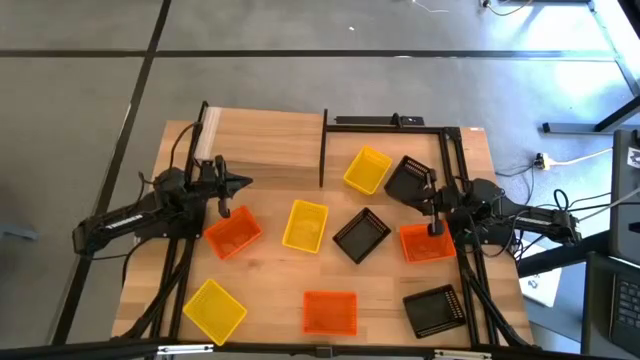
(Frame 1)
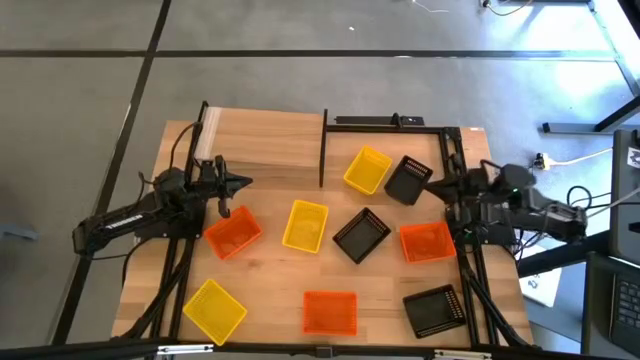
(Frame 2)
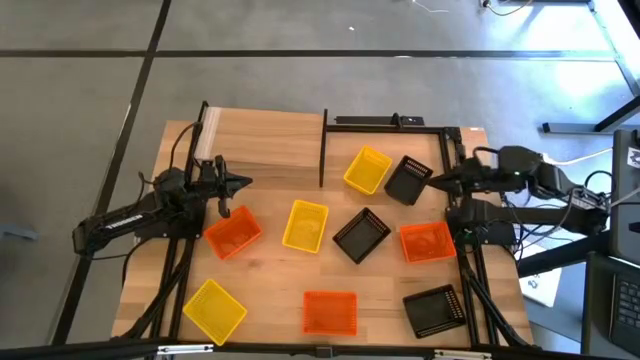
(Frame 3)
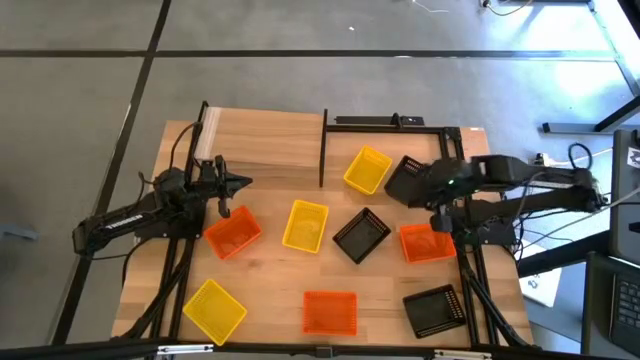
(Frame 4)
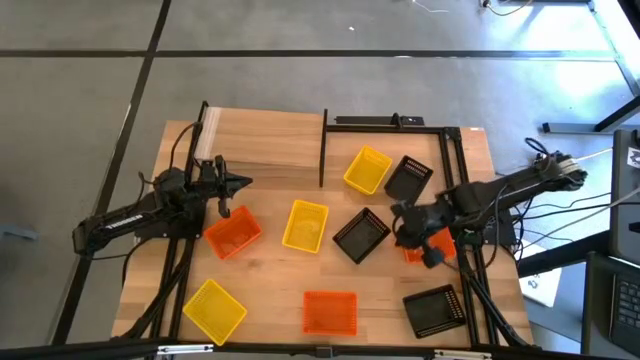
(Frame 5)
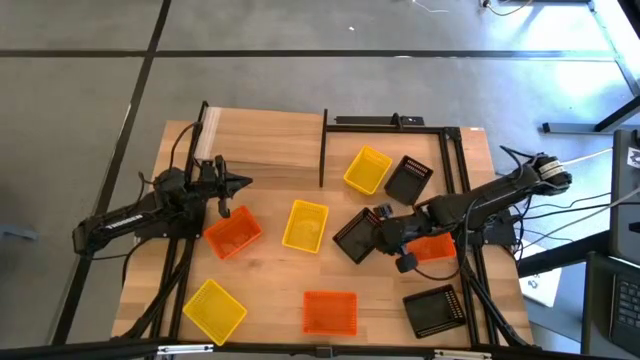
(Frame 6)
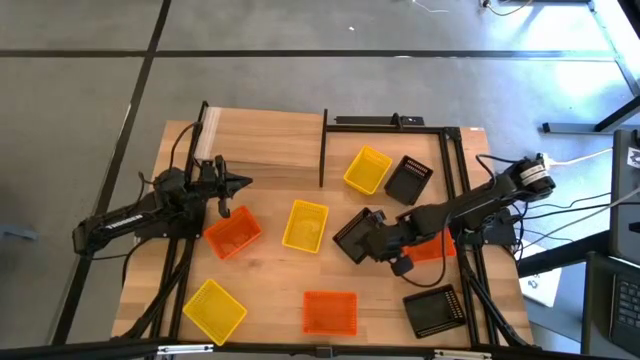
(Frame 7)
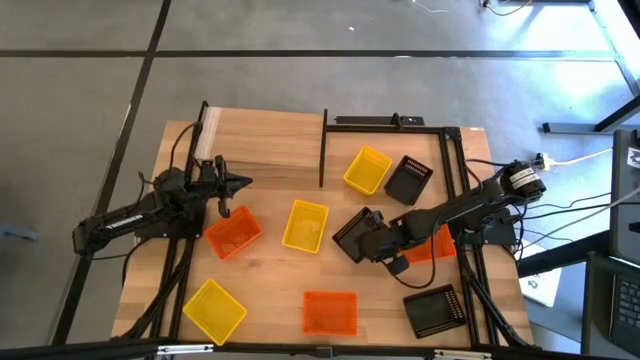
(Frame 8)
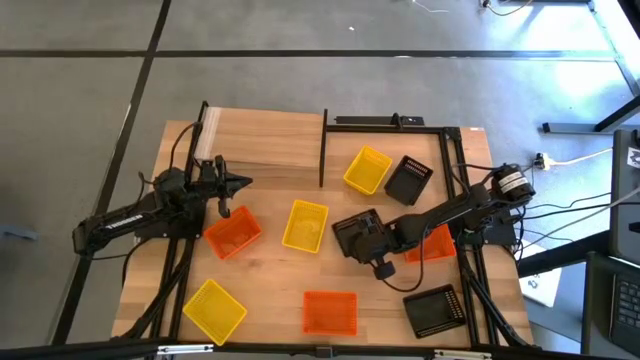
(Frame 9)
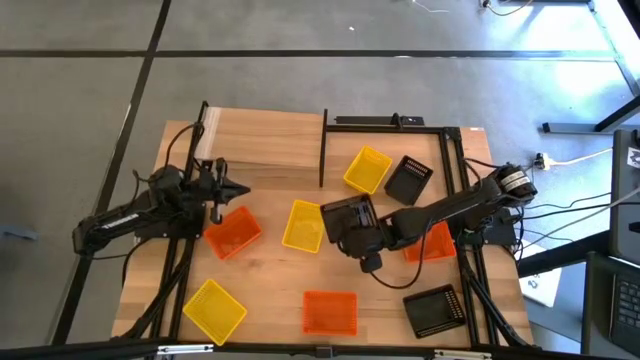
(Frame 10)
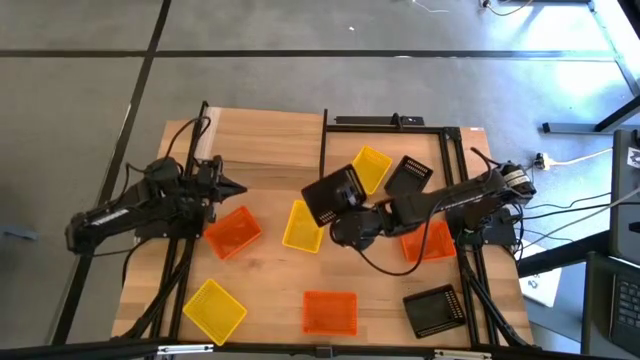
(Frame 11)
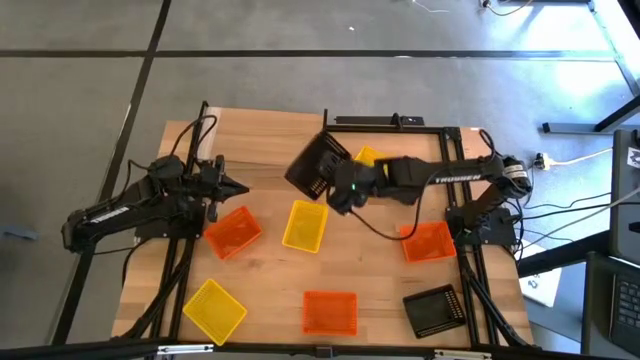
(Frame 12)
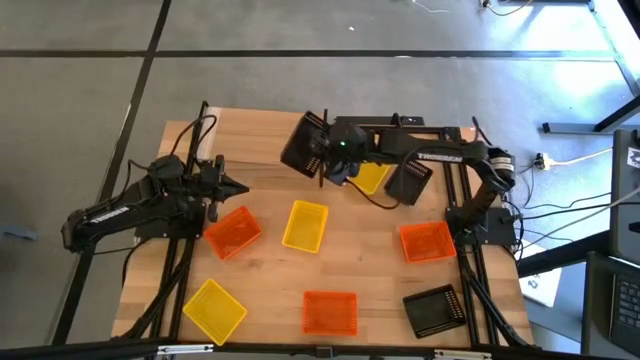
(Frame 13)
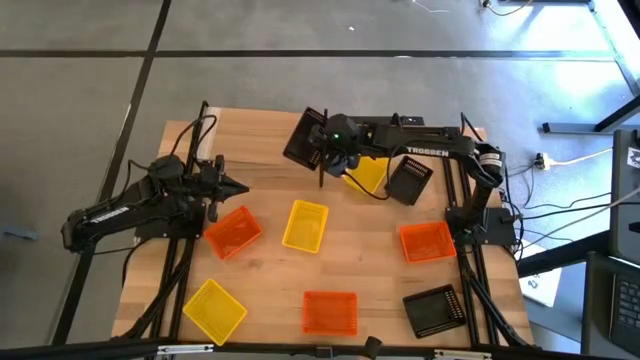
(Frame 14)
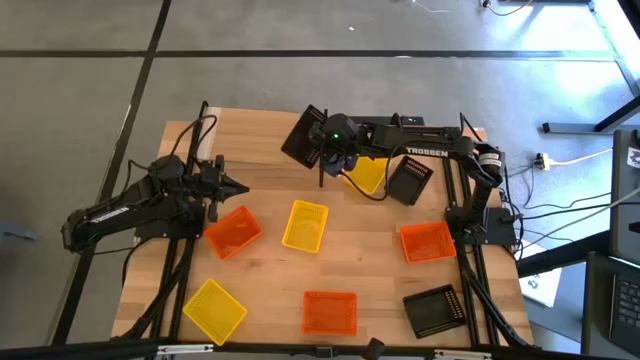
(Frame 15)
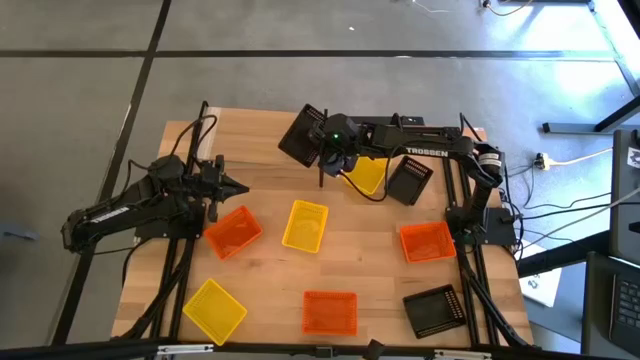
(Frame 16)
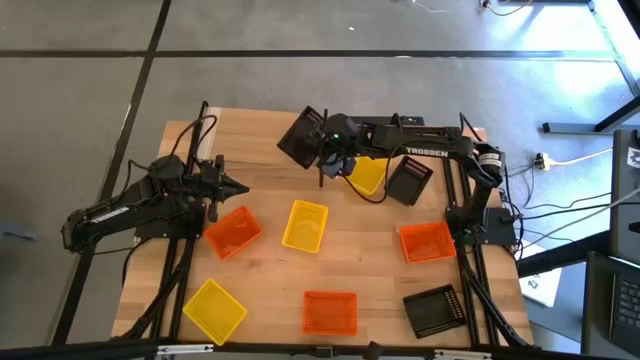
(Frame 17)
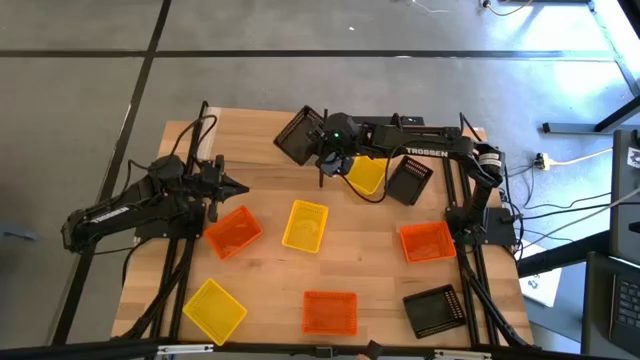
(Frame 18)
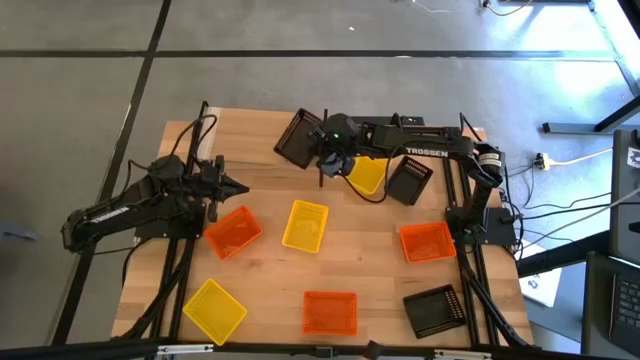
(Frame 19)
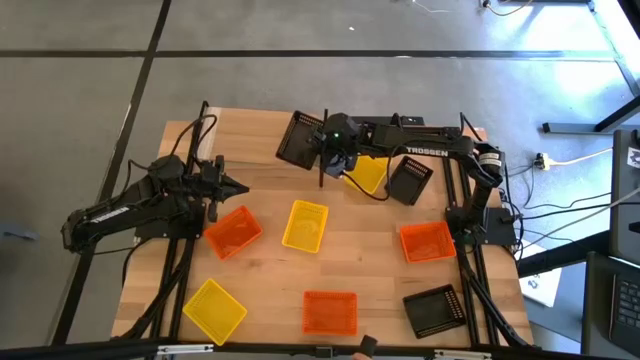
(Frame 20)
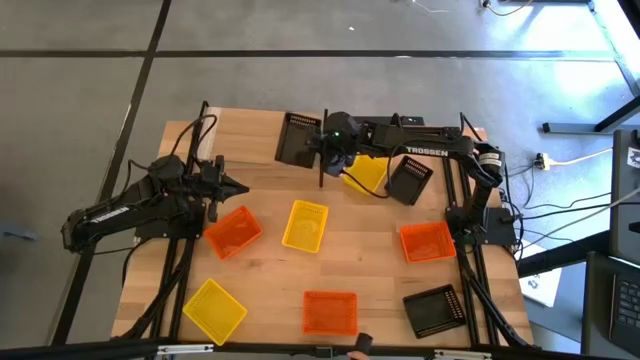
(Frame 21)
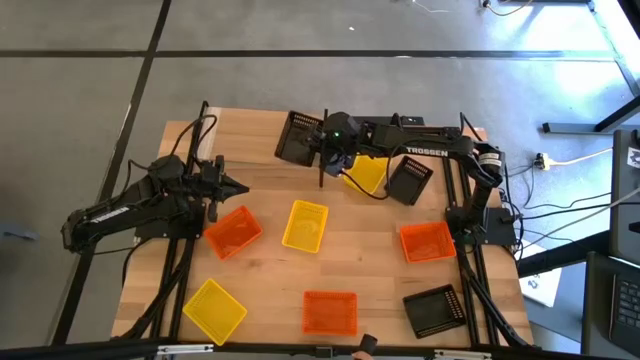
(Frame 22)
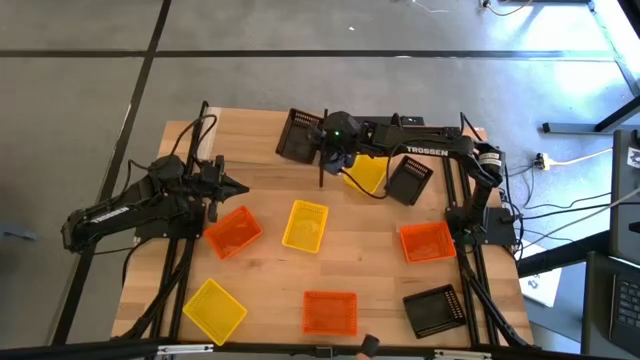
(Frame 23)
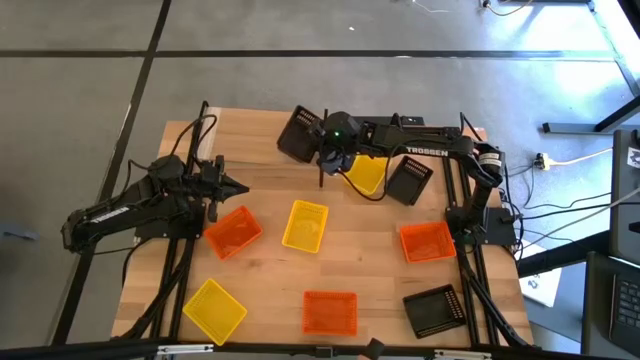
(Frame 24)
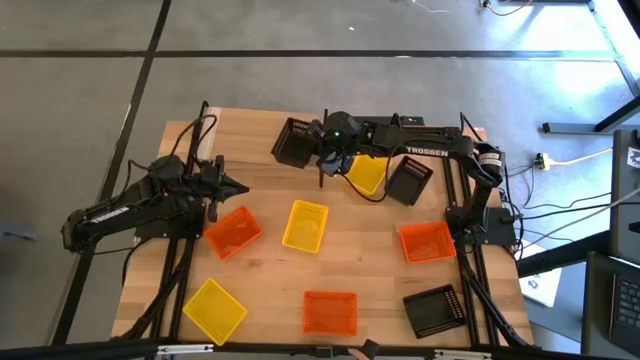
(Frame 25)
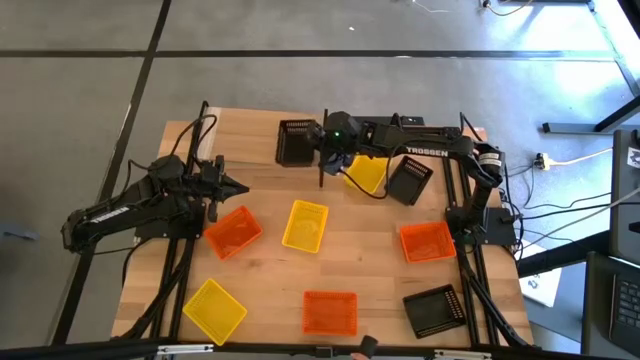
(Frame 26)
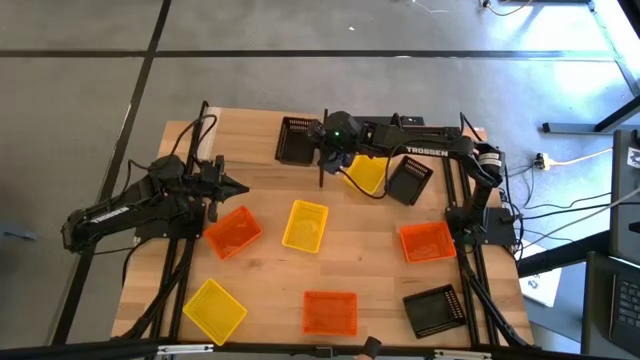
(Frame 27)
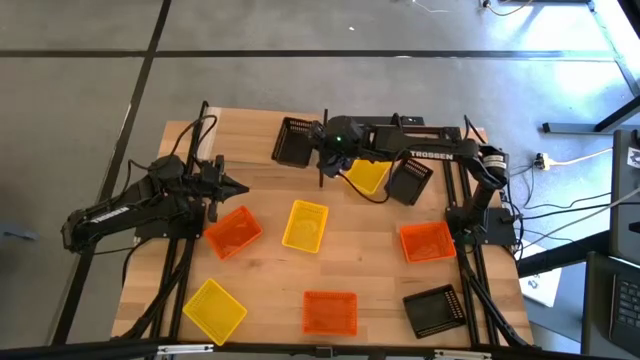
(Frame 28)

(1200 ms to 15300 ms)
Task: Stack baskets on shelf by color
Put the middle black basket on the shelf

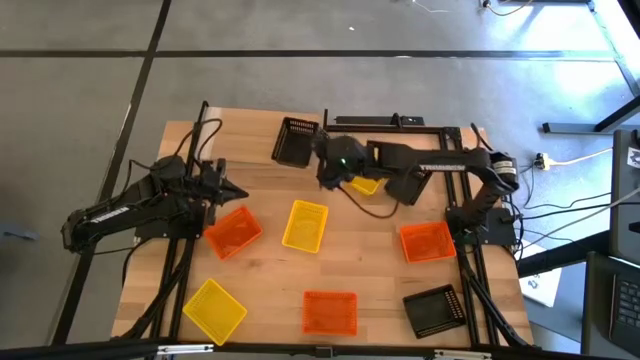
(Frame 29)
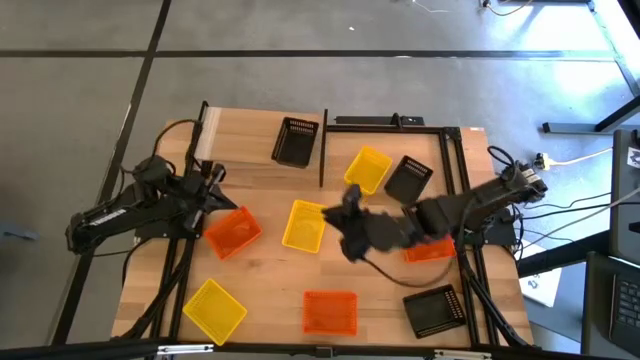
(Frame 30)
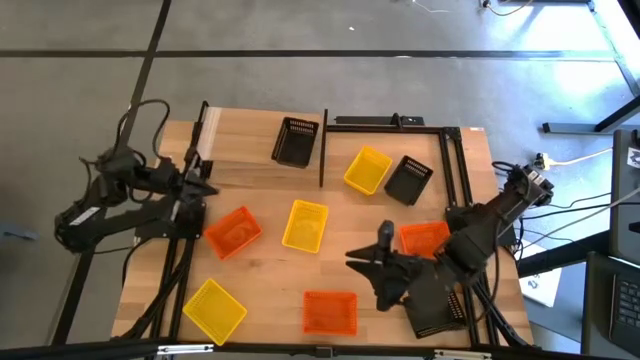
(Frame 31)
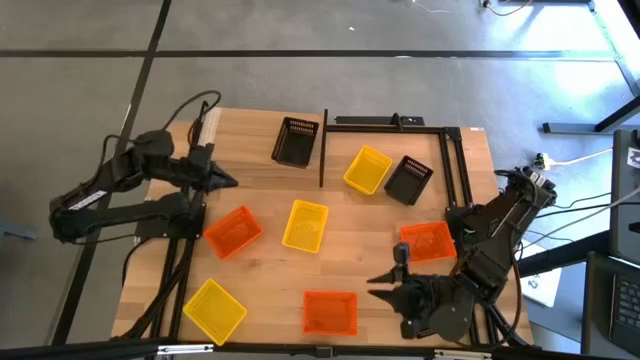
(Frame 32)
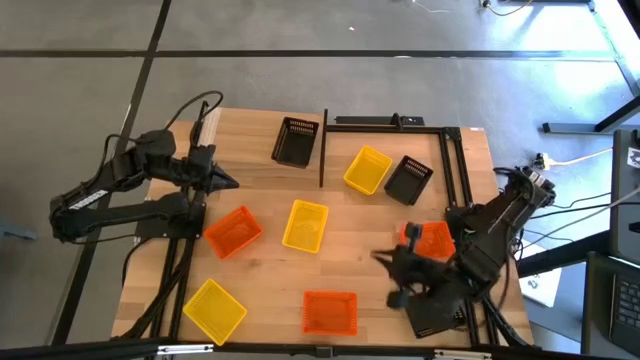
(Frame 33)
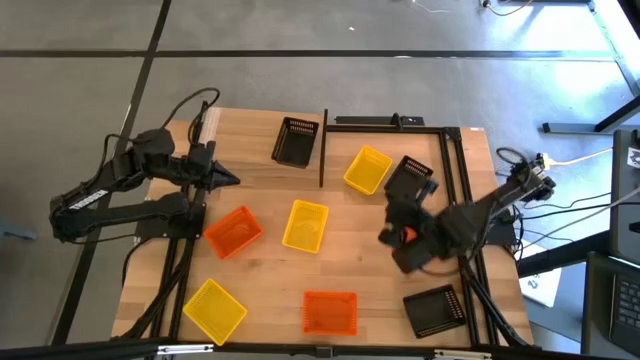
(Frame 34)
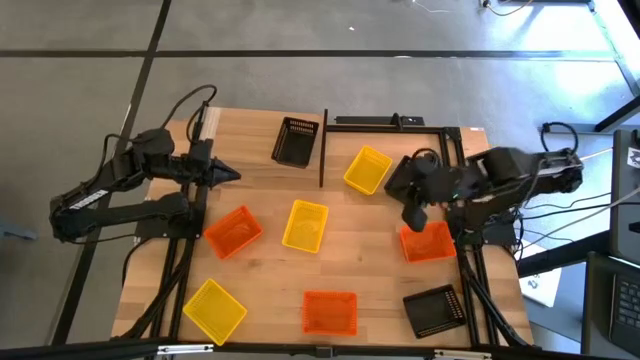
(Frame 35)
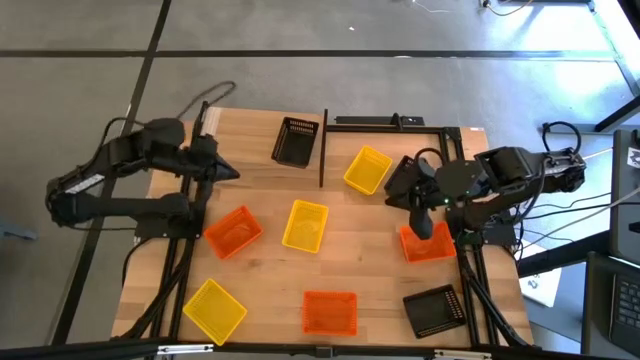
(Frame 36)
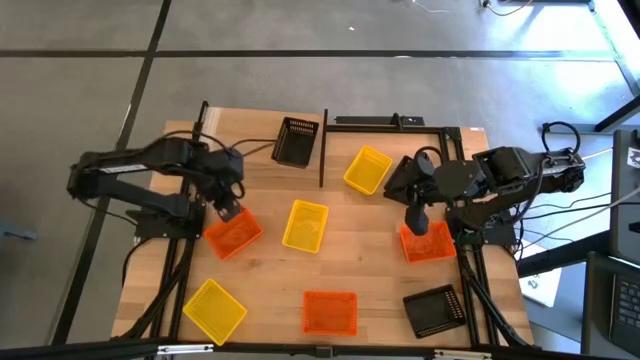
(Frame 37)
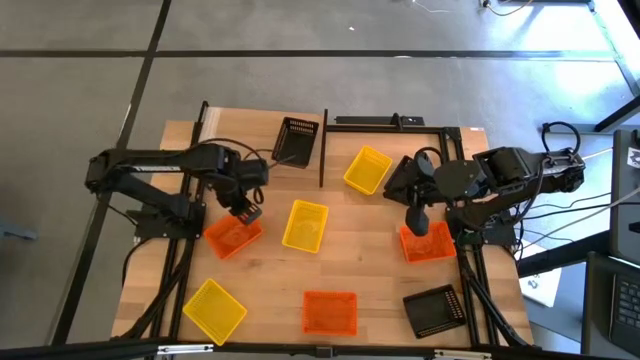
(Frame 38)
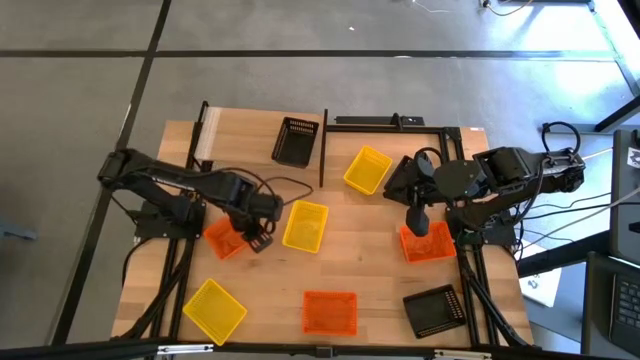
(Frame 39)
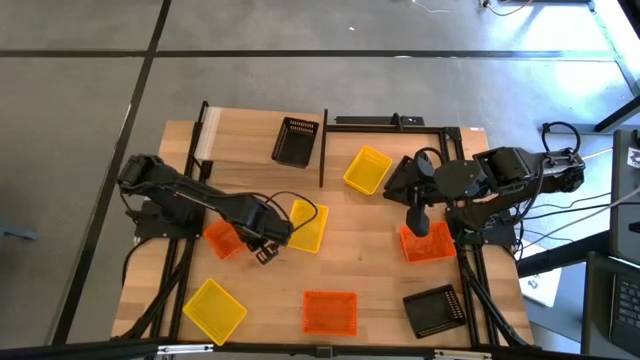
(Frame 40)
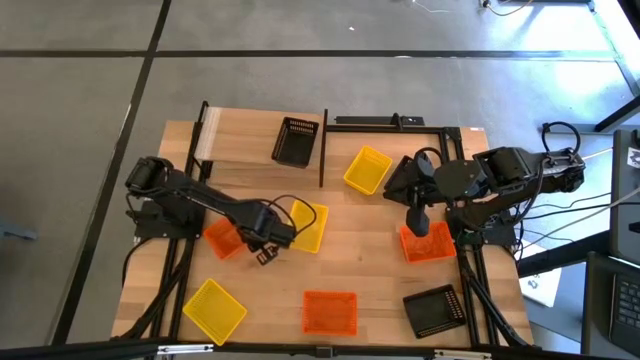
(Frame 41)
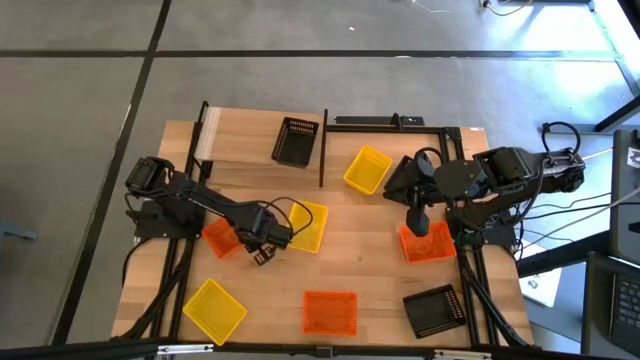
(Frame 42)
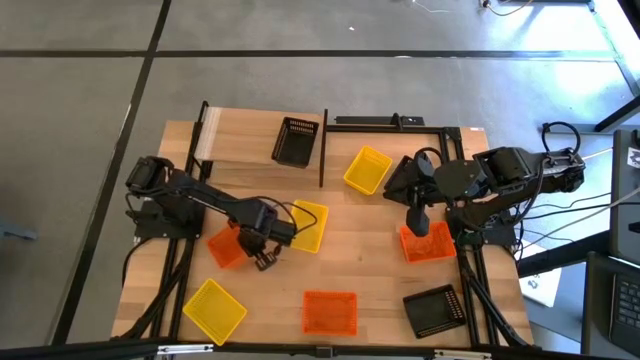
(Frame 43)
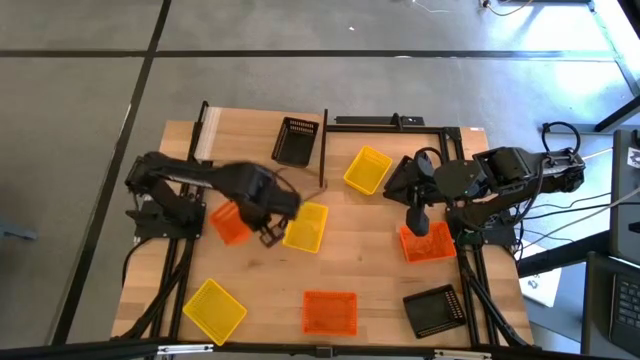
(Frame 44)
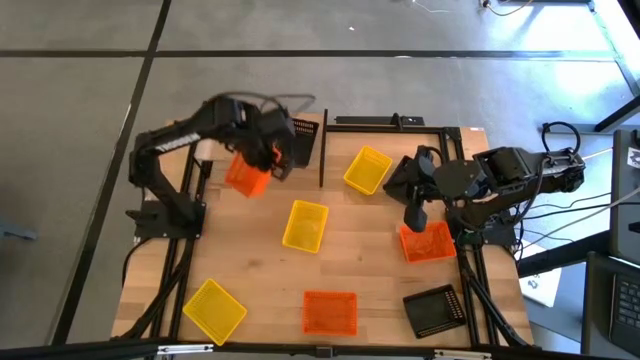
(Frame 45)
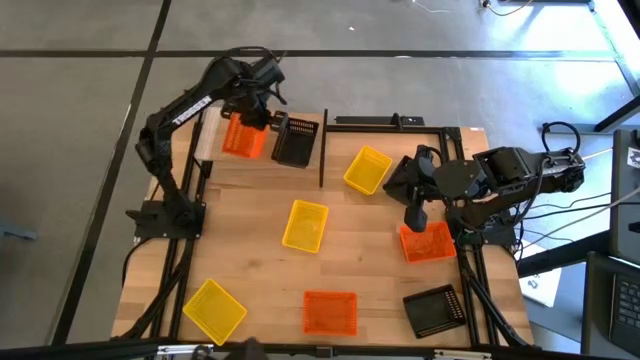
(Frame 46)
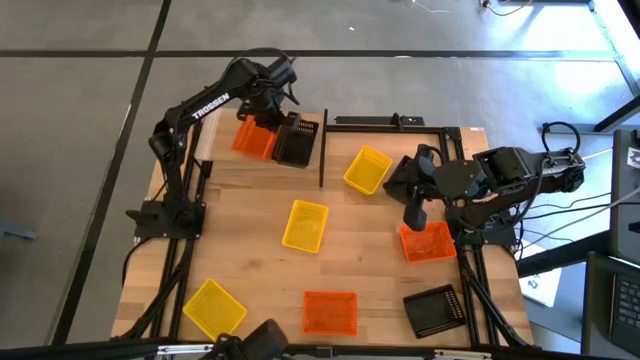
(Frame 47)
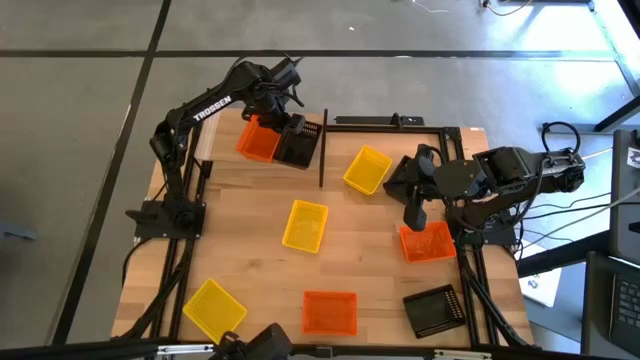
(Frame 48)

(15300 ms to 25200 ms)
Put the top left orange basket on the shelf
